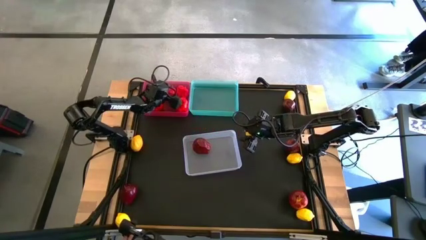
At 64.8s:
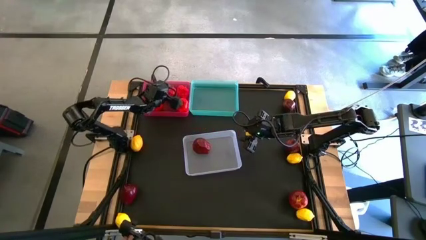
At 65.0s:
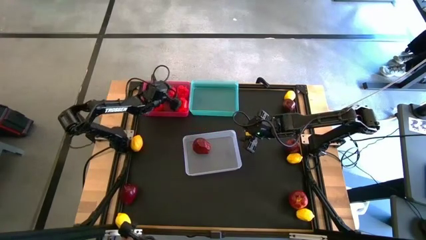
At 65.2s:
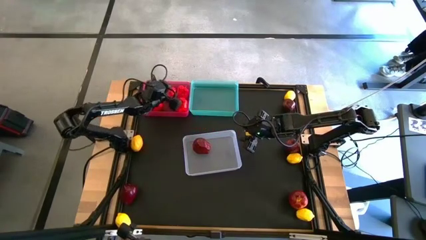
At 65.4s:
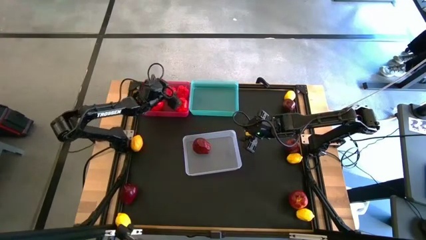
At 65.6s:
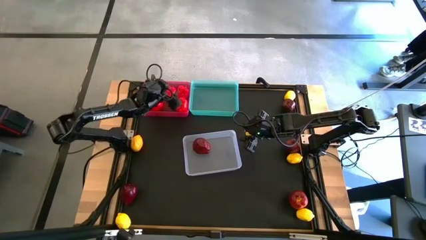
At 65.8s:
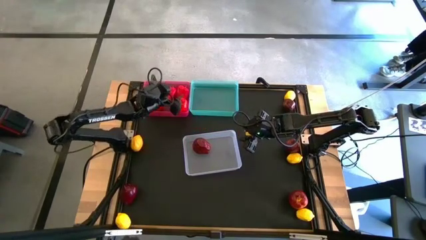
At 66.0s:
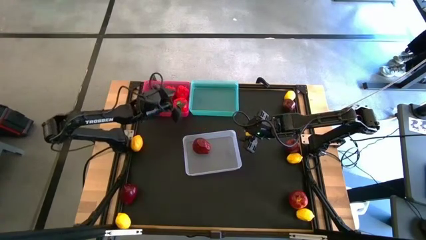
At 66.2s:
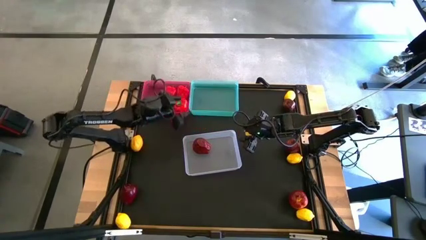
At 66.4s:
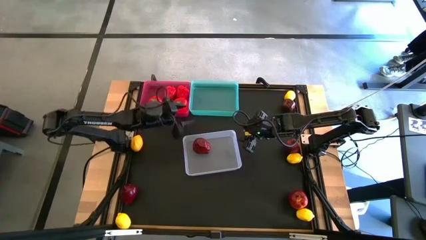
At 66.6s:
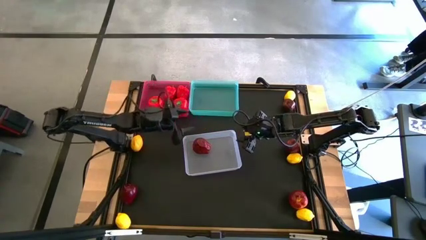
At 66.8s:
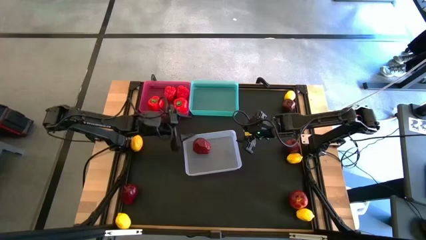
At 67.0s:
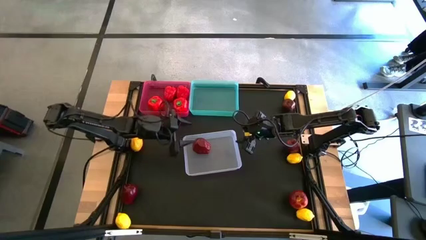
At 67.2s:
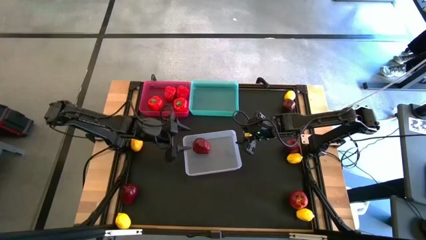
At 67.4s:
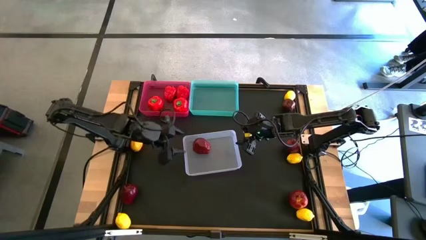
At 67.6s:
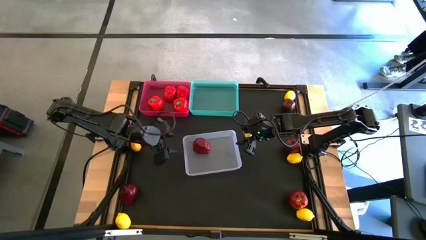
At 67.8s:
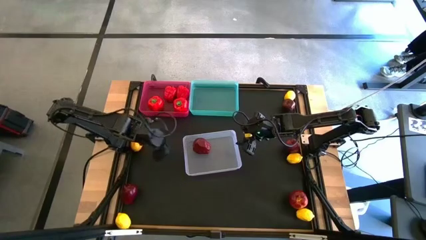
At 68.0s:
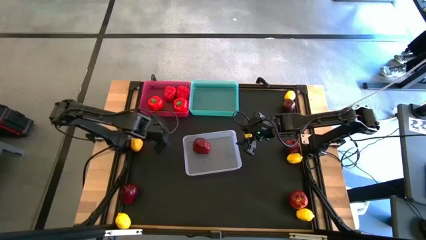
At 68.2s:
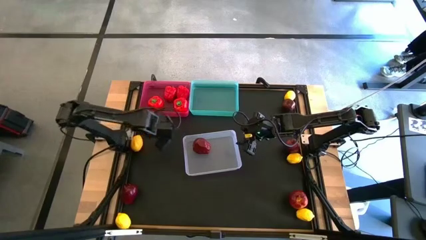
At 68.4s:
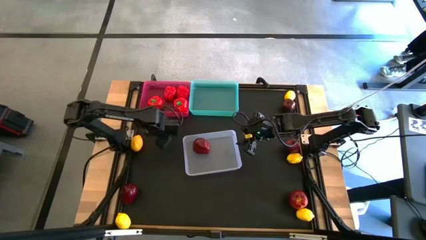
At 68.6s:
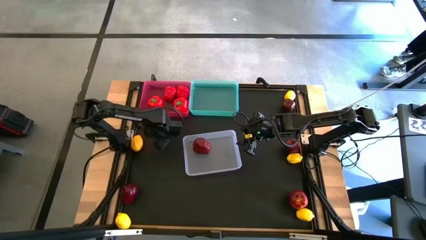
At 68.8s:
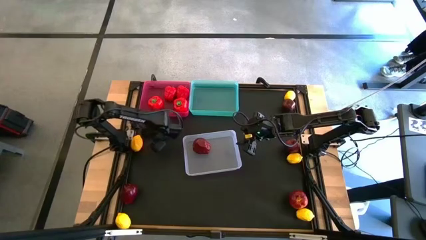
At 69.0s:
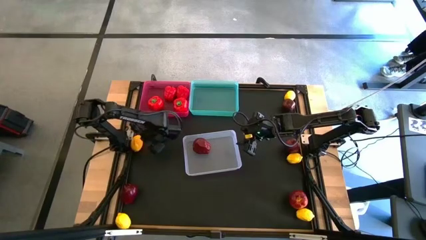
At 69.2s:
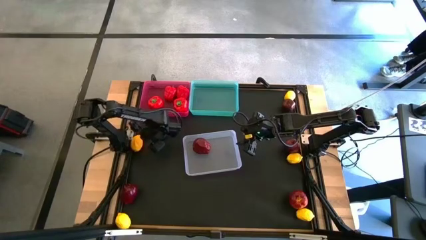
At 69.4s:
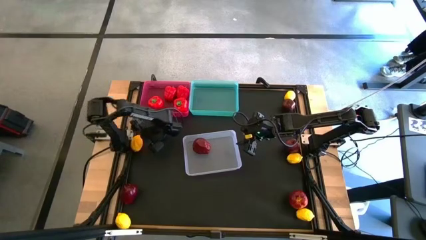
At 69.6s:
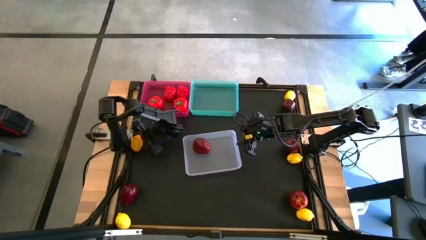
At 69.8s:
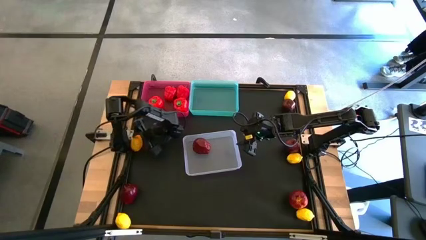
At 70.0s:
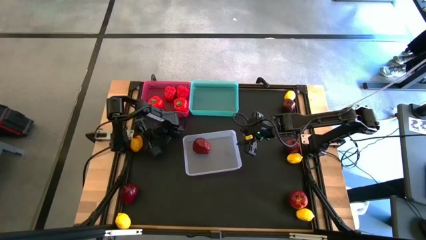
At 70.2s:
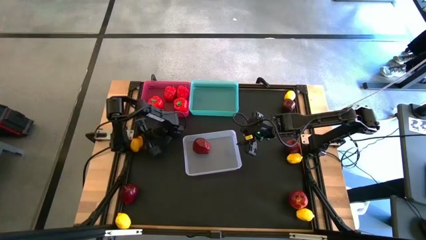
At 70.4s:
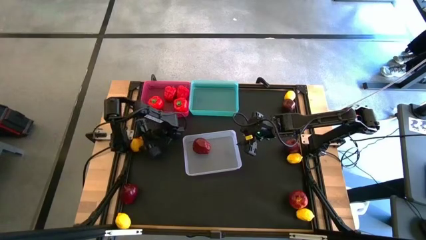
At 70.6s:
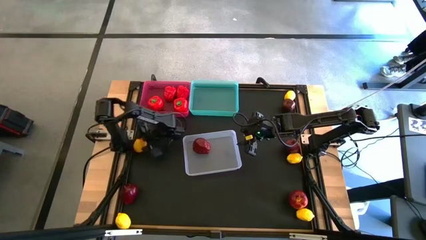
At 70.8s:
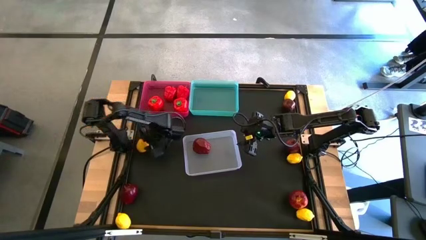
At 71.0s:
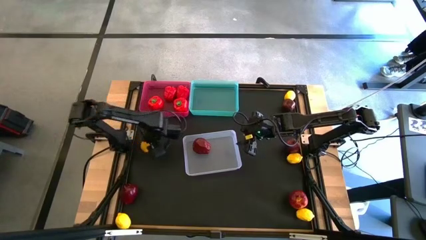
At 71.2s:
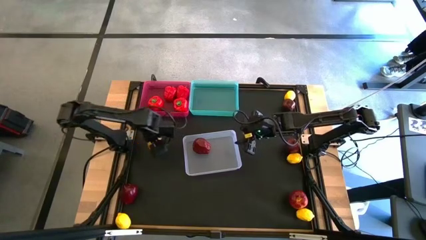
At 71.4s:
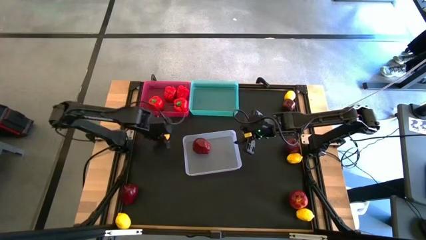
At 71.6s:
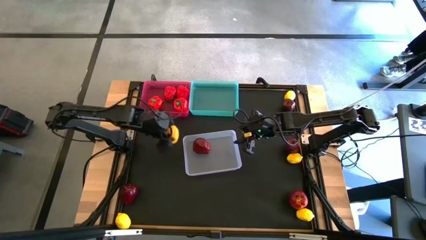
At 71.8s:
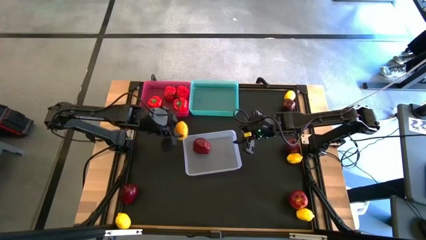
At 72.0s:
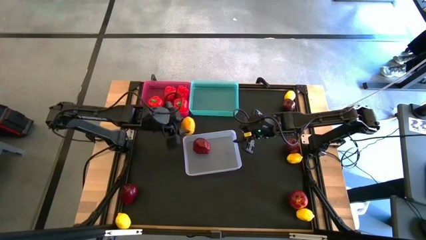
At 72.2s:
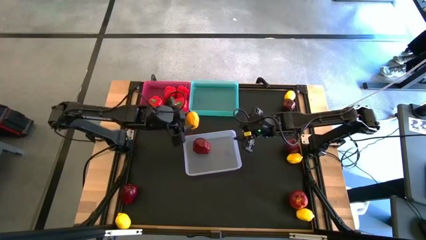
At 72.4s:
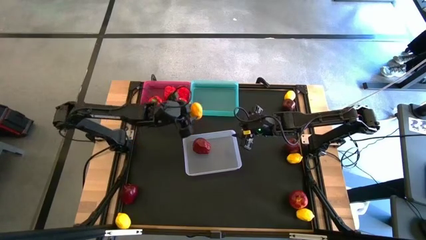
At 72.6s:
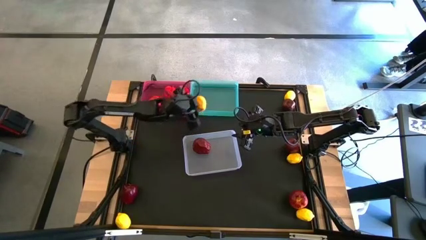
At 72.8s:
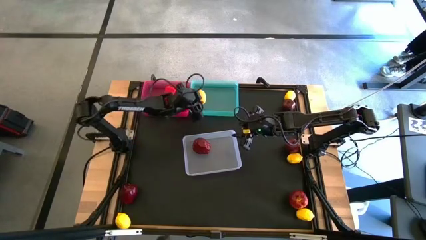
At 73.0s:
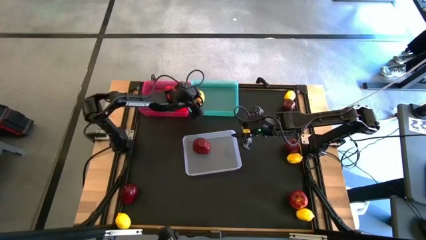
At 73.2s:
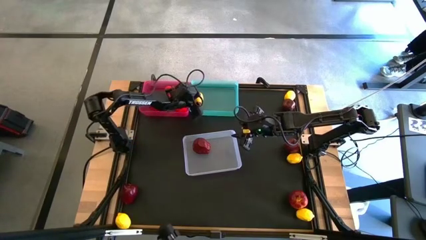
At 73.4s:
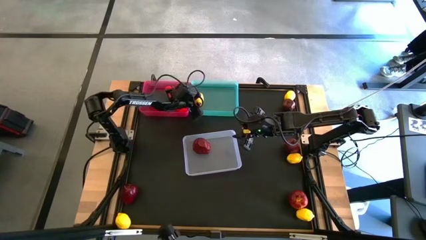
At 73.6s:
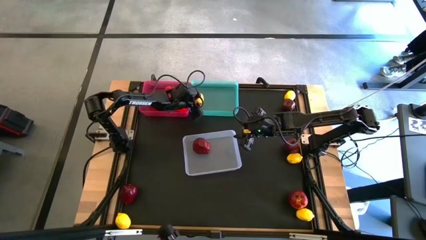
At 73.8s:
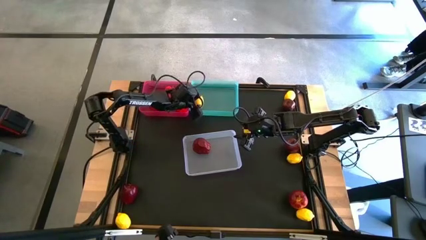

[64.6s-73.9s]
Task: Sort produce into baskets
Put the yellow lemon into the blue bin

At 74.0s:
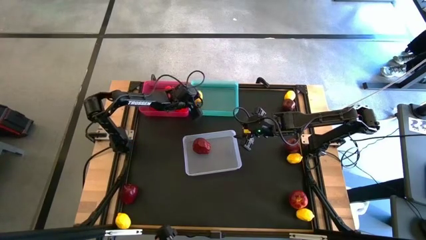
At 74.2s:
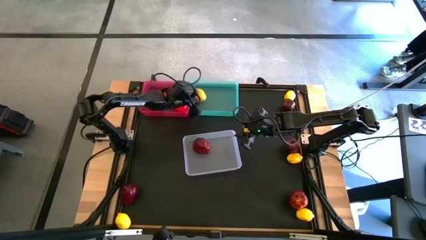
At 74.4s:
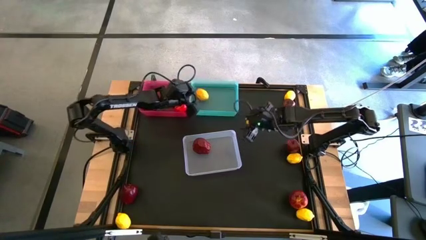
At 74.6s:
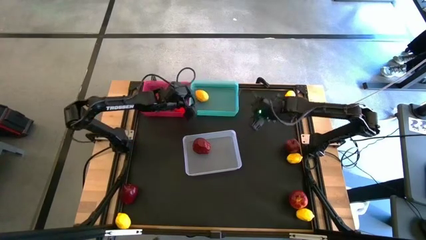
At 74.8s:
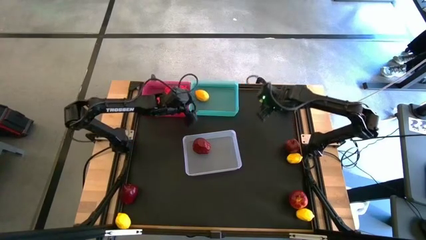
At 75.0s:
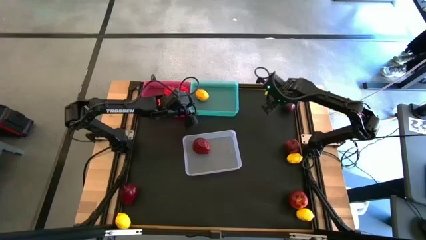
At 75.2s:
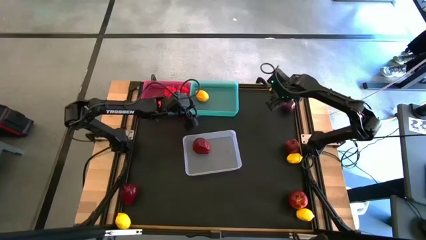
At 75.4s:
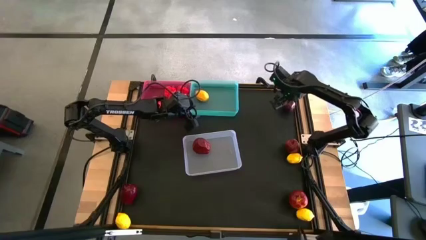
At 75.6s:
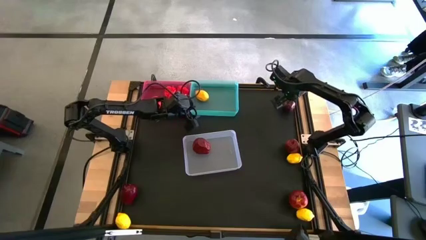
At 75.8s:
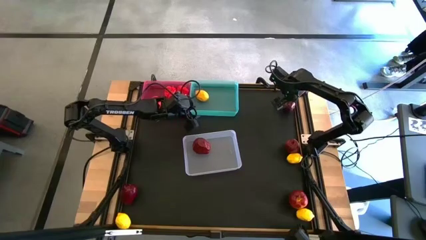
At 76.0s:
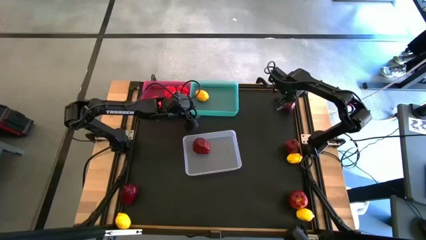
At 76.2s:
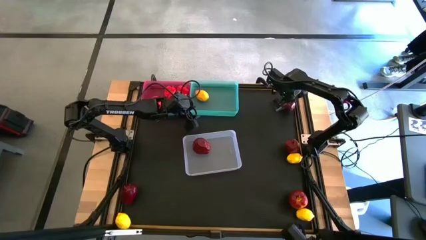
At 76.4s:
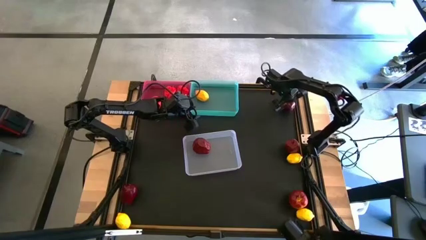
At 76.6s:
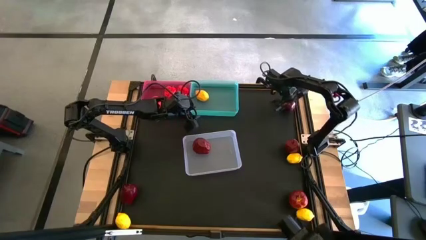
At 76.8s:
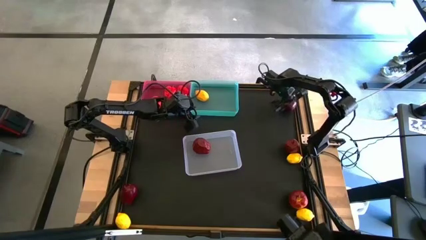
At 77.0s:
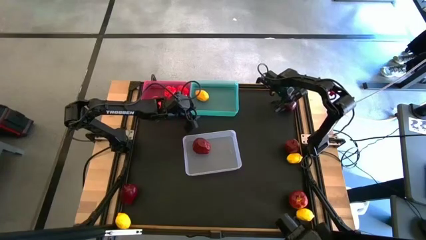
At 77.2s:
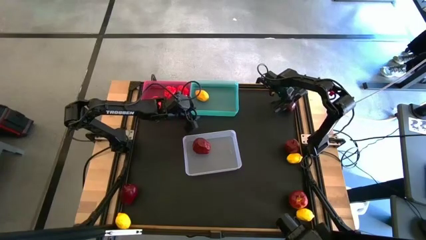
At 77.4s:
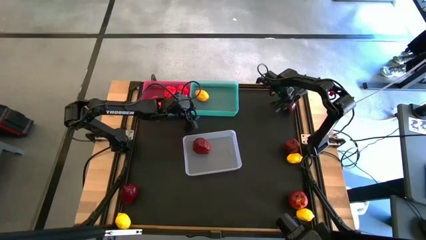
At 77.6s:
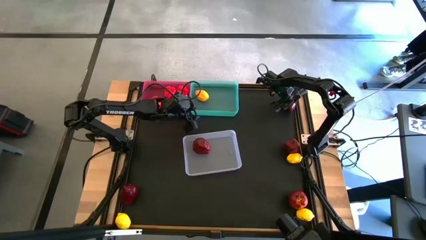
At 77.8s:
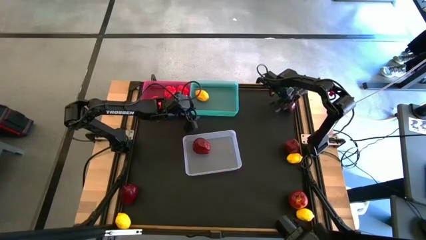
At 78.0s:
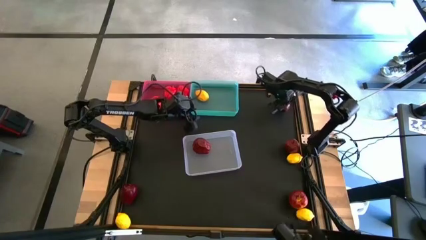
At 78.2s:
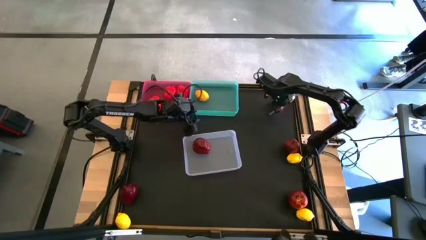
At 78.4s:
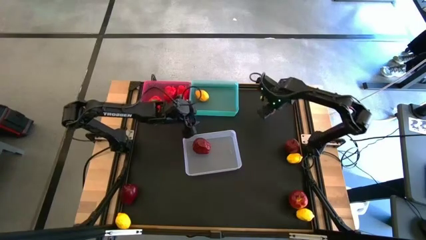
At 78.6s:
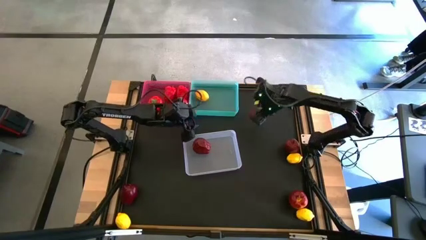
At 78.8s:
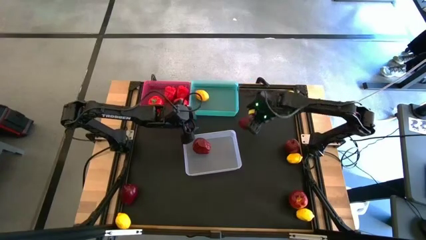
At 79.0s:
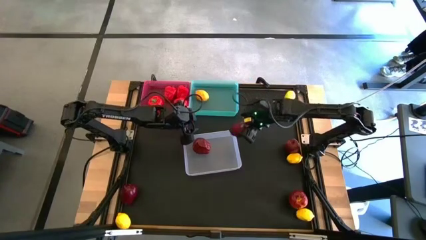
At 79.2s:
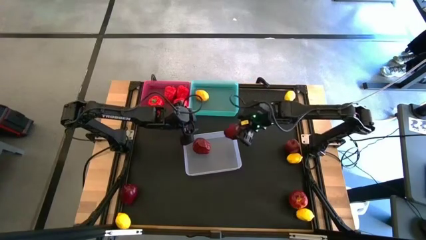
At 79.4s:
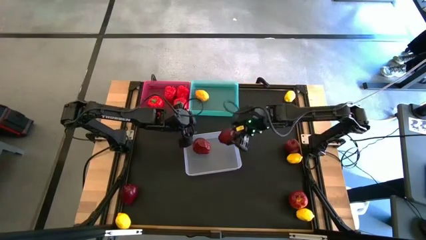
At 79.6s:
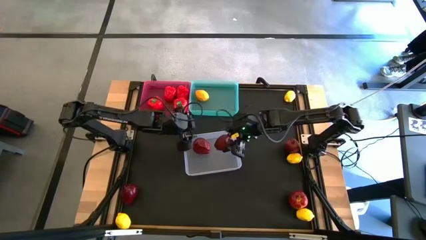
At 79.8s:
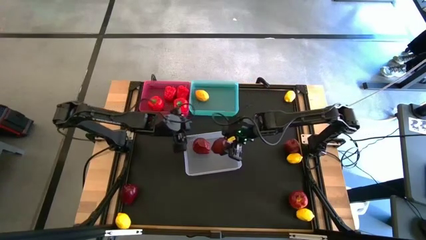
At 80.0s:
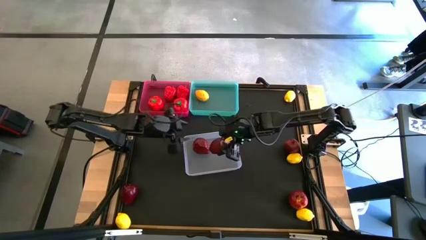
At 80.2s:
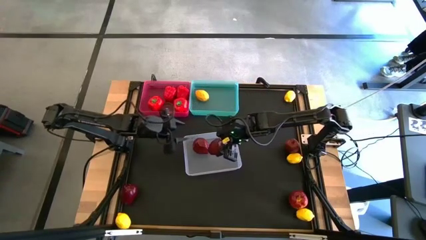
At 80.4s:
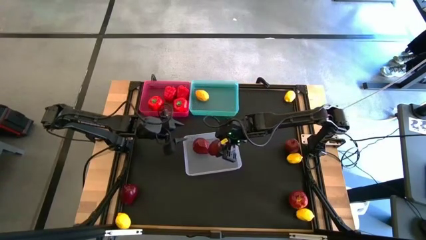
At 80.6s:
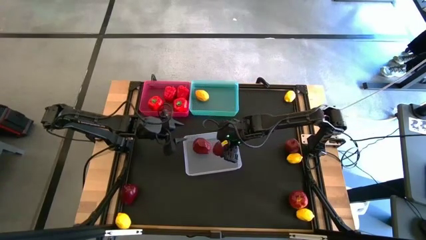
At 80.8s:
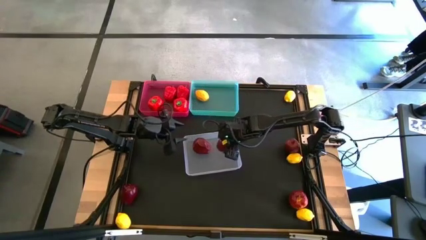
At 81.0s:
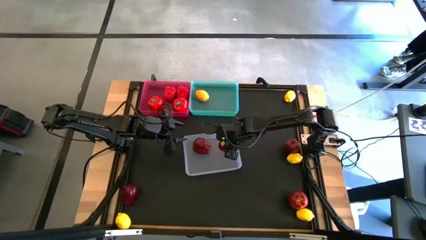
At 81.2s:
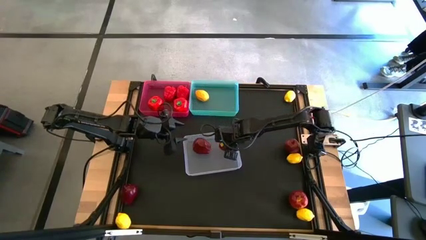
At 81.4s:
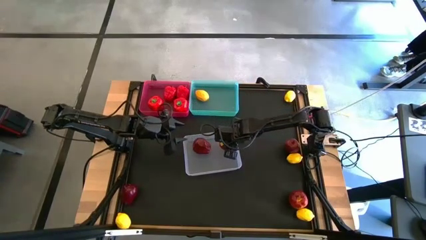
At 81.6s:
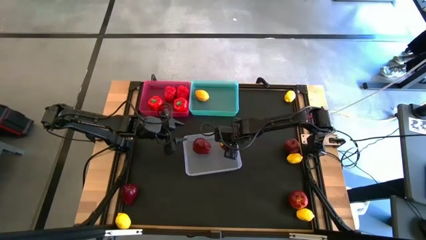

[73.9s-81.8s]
Put the dark red apple into the transparent bin
